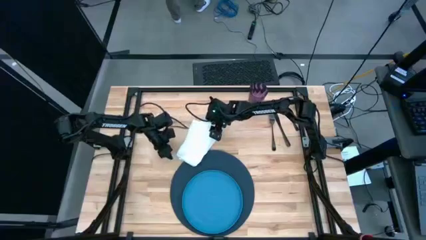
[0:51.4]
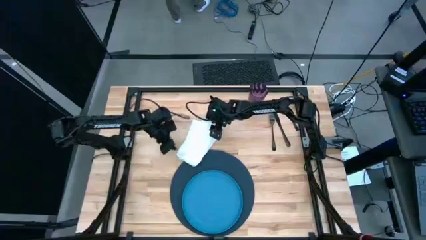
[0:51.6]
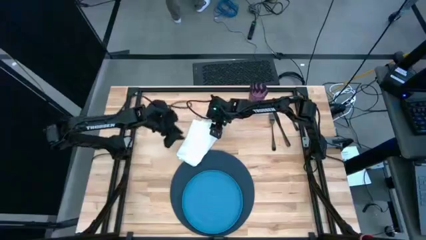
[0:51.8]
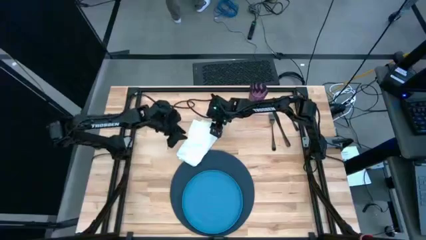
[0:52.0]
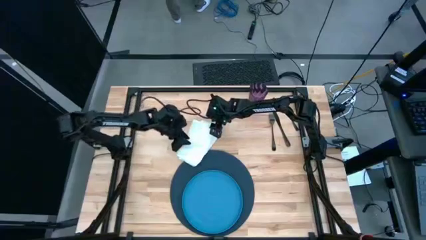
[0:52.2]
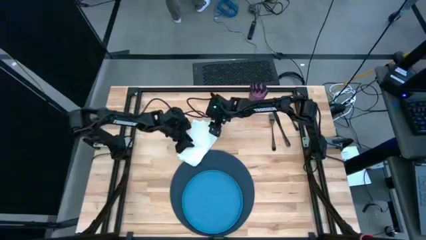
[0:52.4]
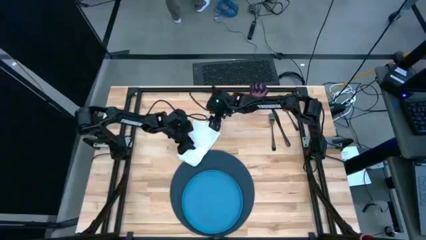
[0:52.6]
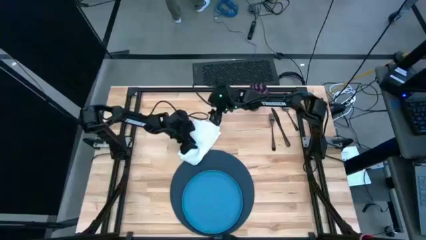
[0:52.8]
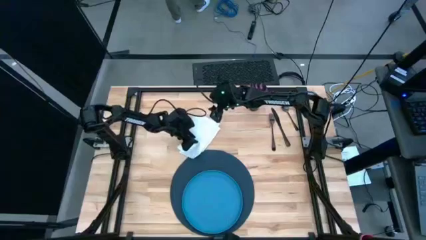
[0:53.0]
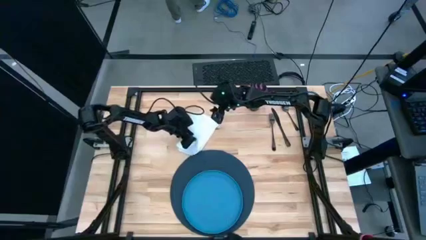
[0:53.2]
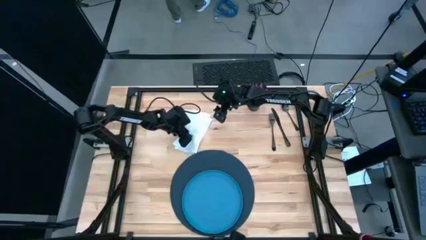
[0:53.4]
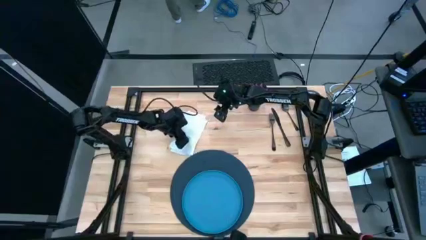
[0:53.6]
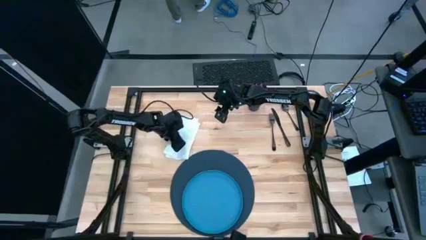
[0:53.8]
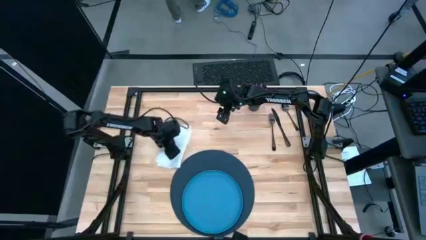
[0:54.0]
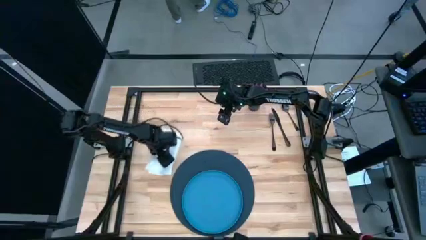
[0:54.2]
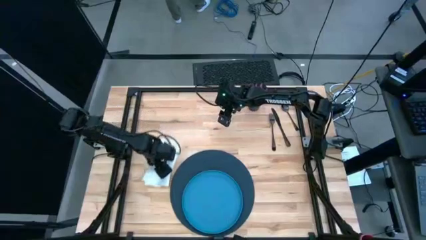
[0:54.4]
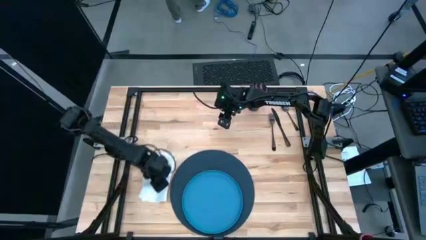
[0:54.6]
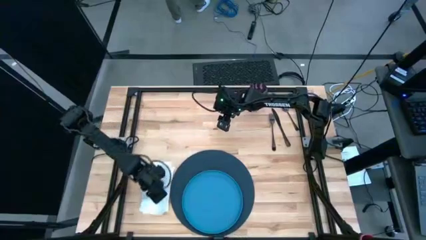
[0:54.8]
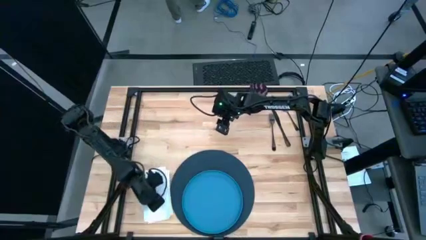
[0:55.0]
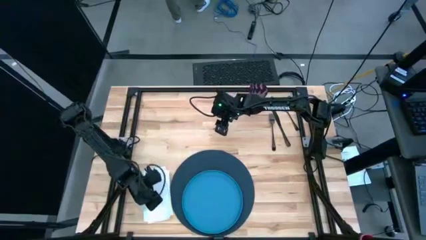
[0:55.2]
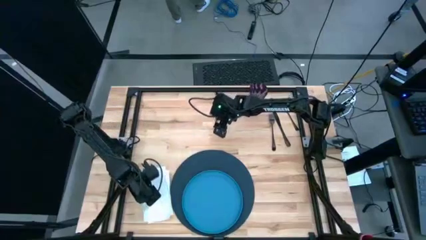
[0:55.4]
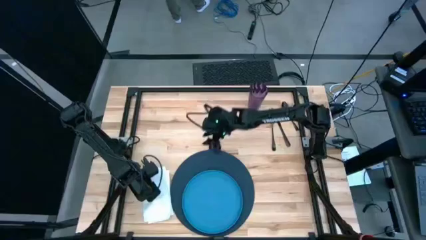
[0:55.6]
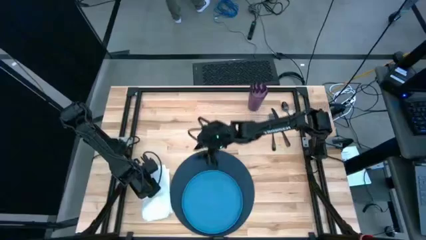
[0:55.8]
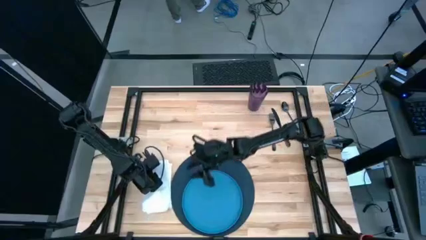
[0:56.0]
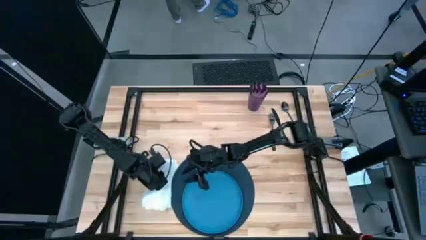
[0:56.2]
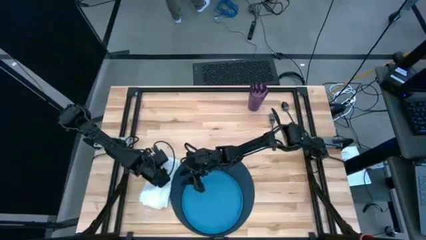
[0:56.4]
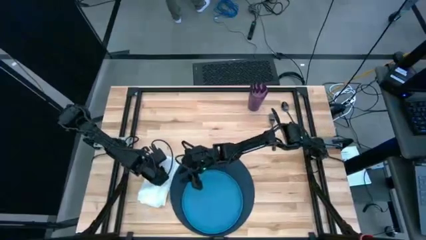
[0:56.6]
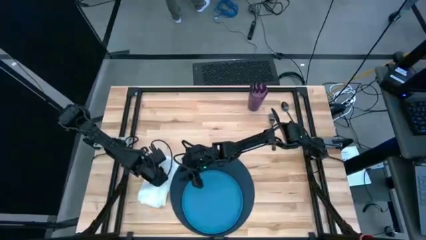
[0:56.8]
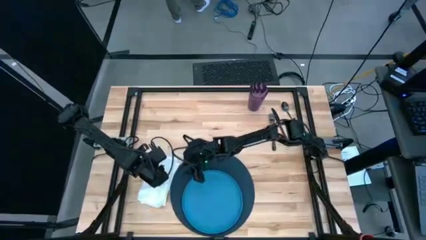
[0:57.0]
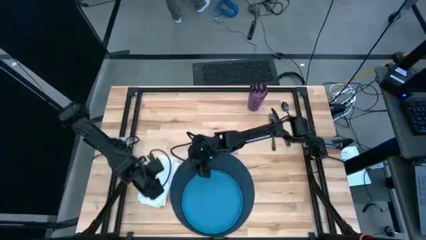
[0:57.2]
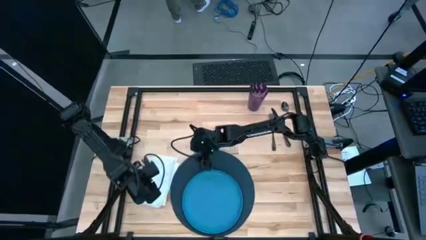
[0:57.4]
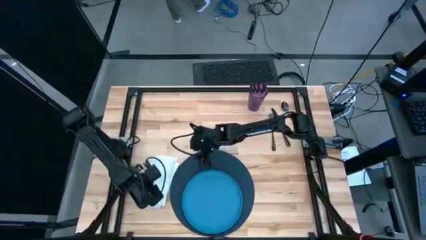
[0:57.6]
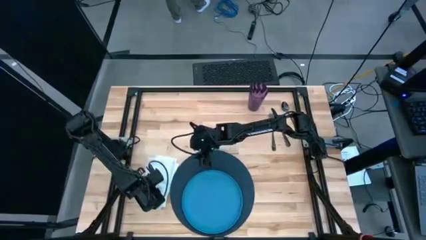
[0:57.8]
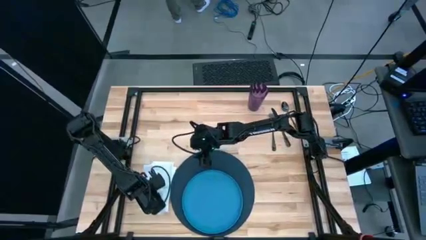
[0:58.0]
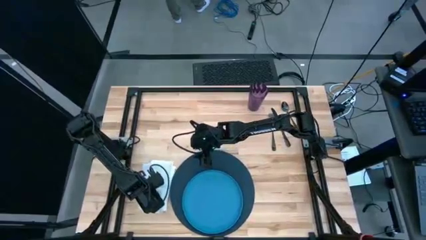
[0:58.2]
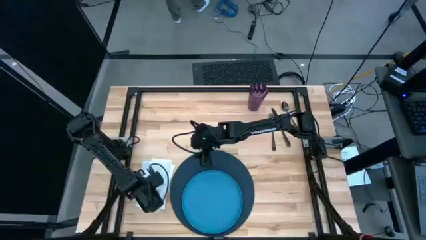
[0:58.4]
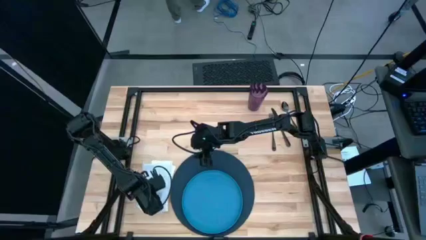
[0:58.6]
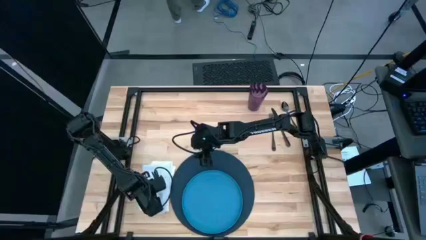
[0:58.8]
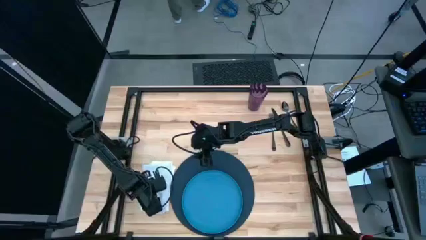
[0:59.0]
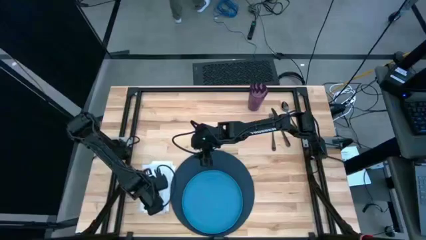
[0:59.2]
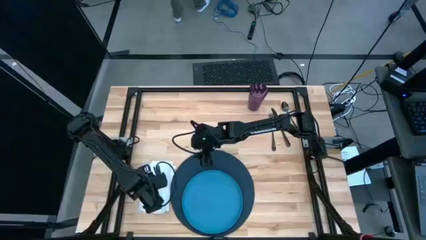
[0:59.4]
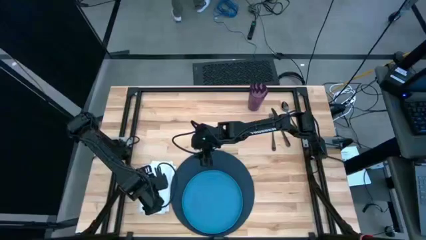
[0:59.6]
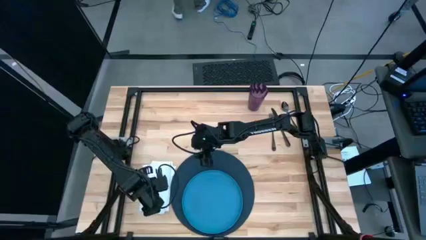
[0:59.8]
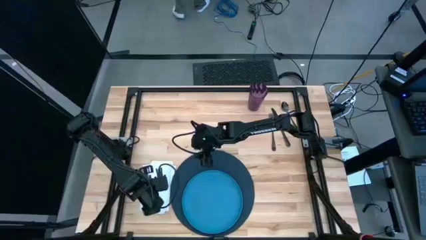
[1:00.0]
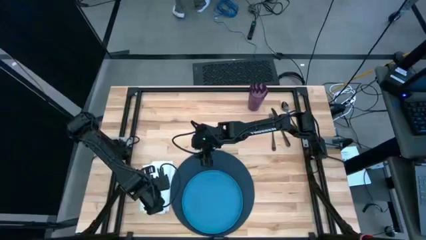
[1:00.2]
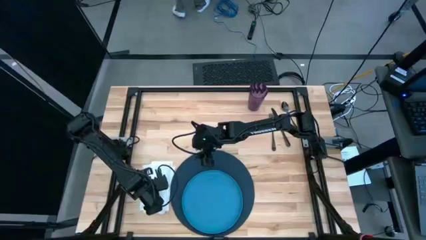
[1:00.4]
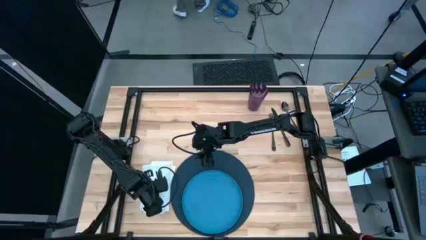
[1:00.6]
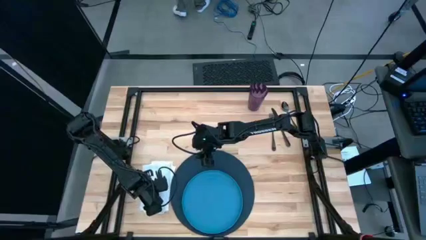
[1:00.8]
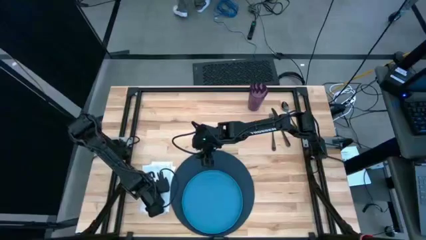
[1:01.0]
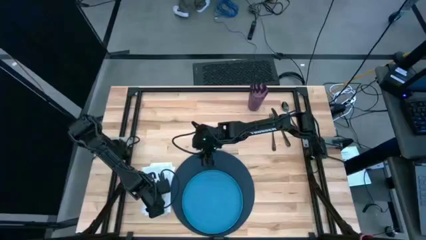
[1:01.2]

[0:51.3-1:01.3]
Task: Set table place
Move the table napkin beside the placemat

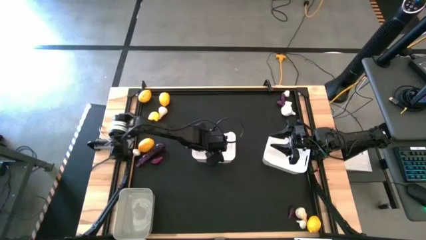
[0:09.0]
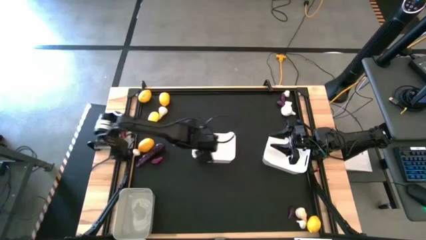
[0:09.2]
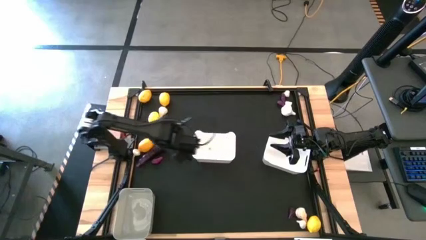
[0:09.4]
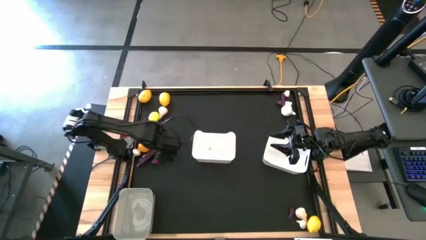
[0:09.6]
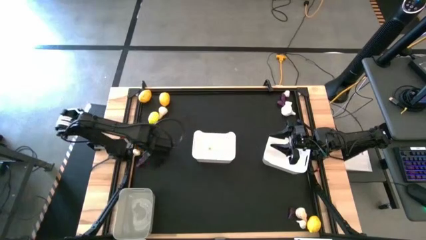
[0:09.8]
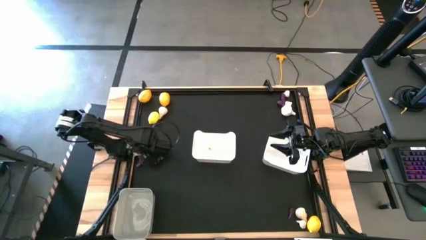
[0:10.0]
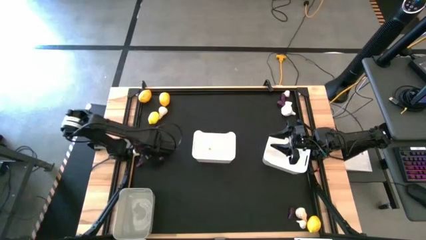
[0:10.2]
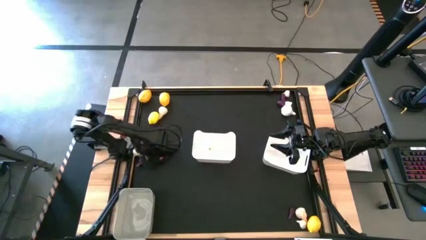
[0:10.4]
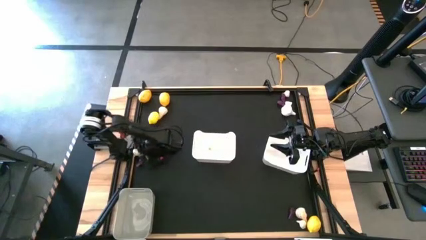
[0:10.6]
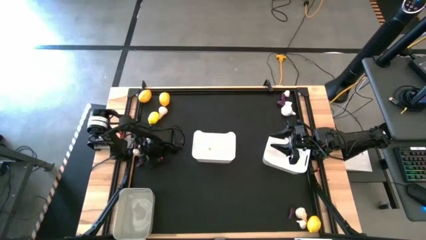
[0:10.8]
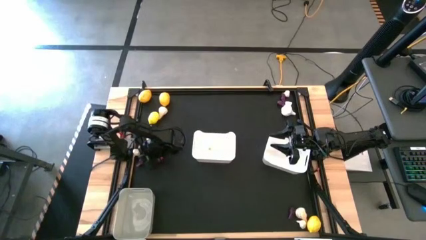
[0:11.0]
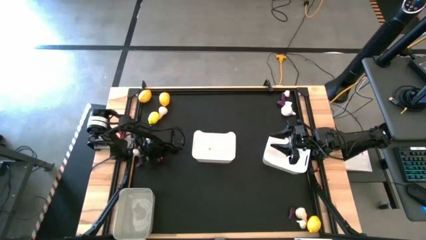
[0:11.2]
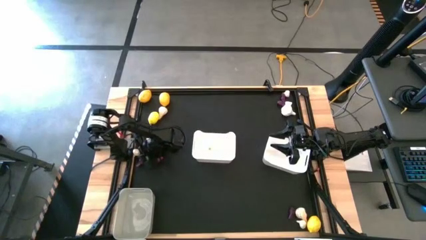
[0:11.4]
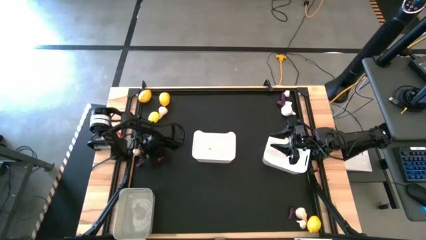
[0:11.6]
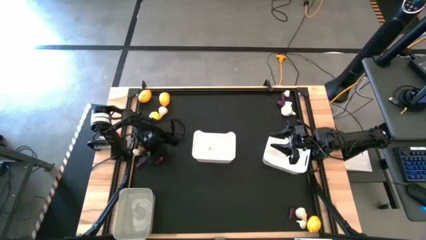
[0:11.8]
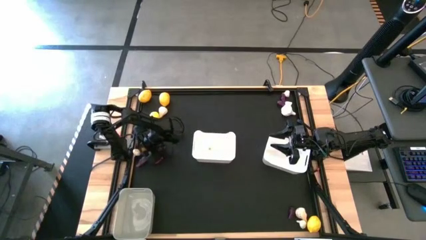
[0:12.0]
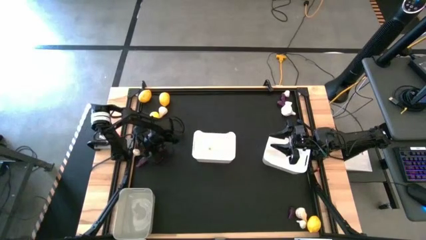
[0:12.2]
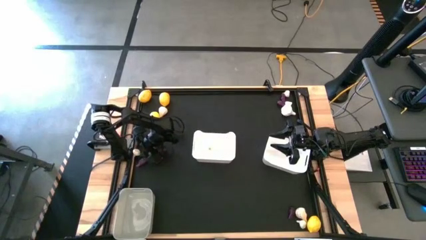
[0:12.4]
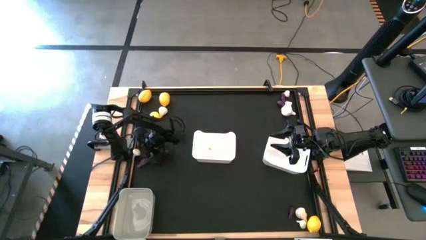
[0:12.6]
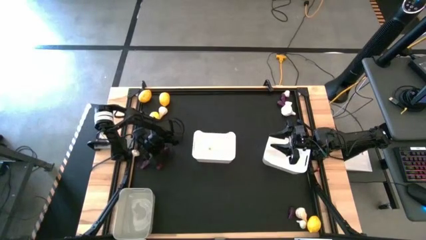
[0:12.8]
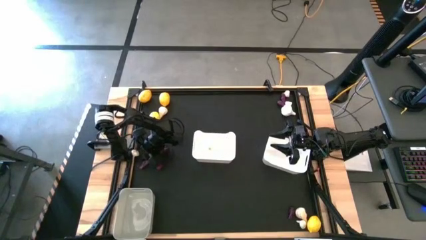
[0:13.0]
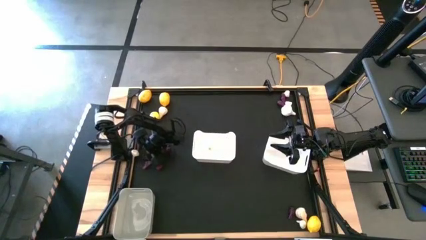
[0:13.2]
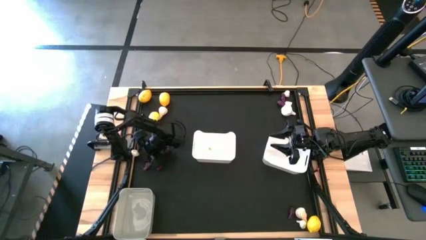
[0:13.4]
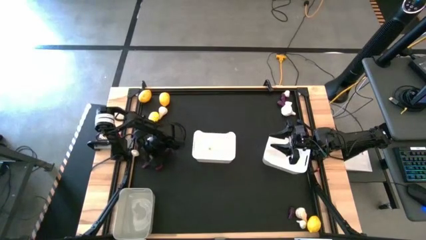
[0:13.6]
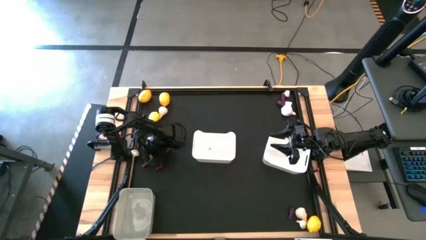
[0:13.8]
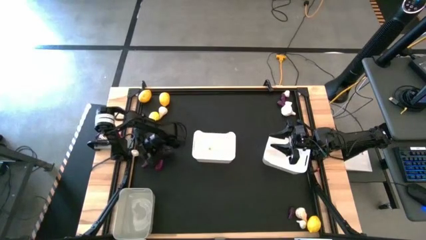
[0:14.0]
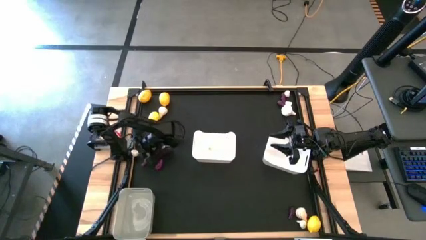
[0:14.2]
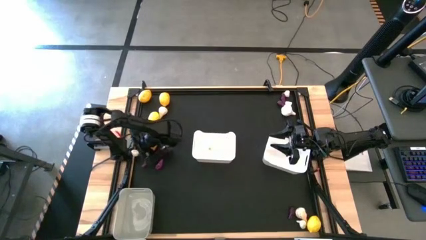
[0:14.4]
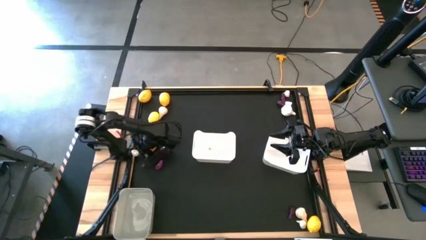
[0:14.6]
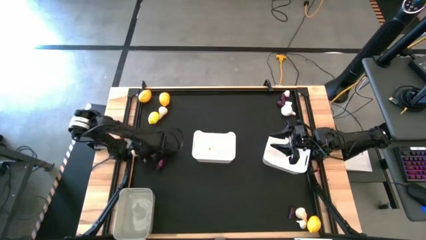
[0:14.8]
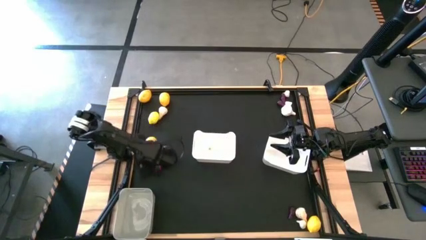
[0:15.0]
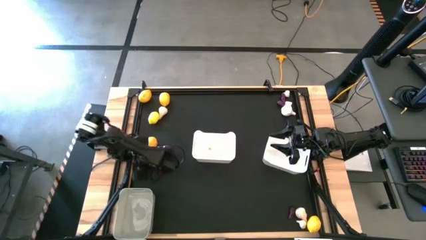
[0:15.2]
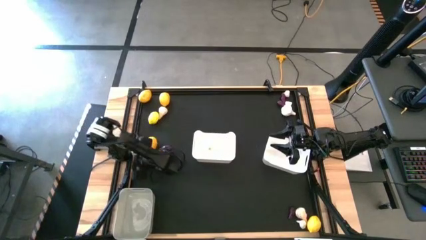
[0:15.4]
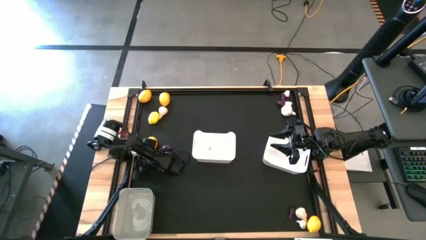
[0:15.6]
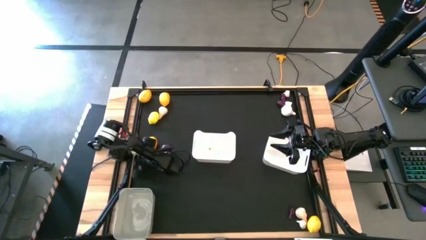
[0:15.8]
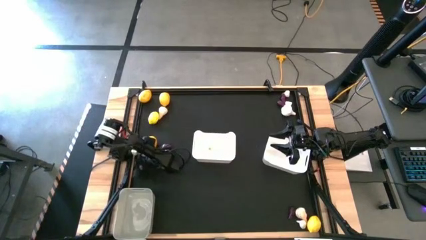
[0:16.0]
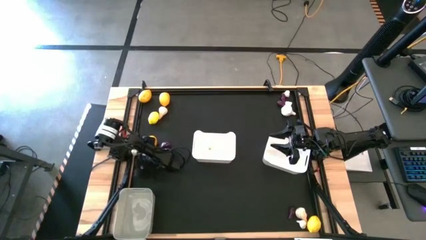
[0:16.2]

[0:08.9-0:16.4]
Task: Sort produce into baskets
Put the garlic into the left white bin
